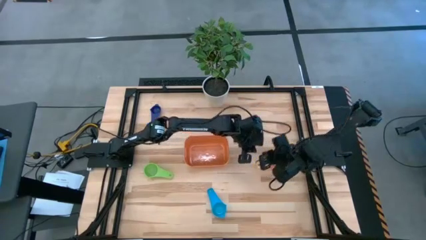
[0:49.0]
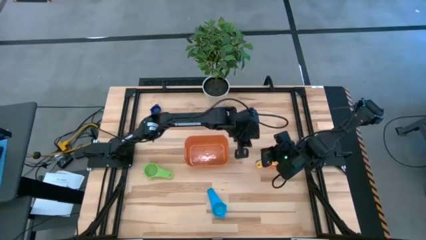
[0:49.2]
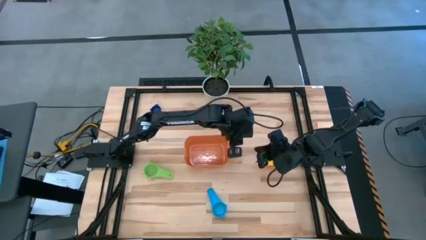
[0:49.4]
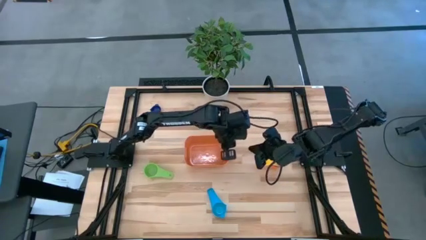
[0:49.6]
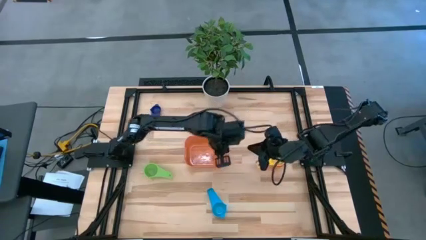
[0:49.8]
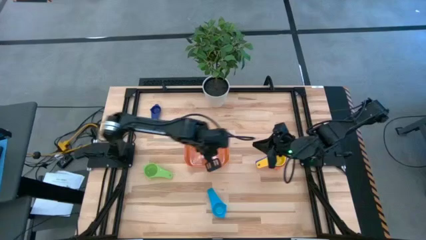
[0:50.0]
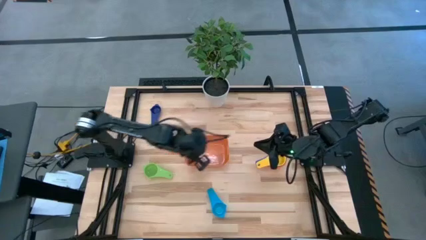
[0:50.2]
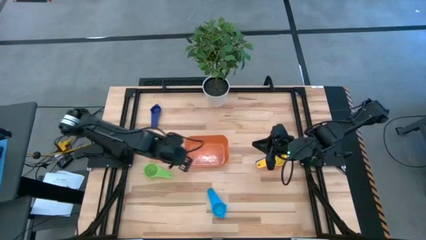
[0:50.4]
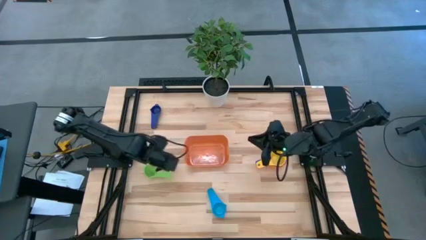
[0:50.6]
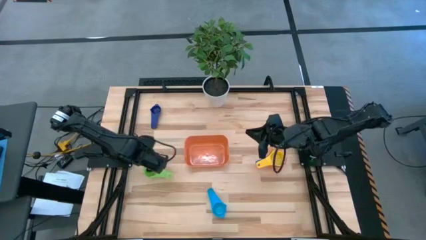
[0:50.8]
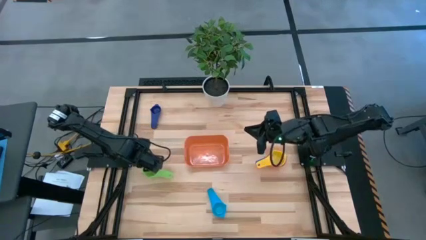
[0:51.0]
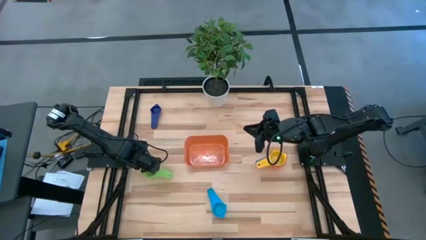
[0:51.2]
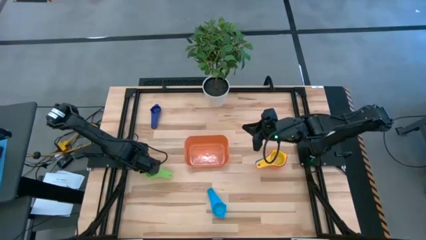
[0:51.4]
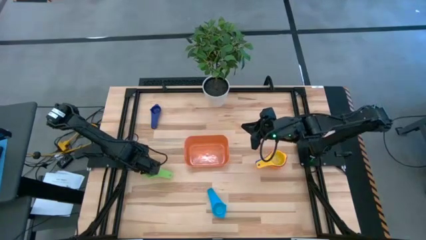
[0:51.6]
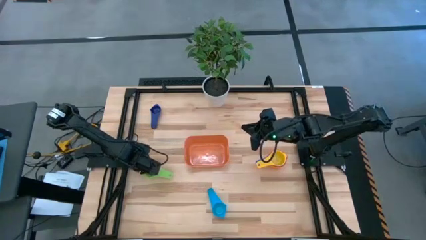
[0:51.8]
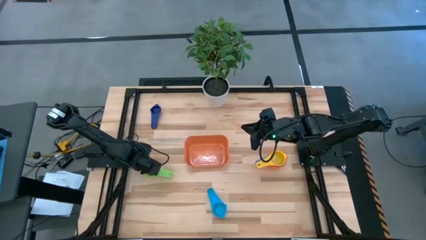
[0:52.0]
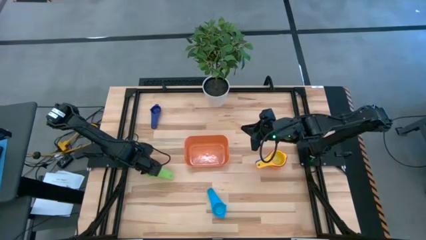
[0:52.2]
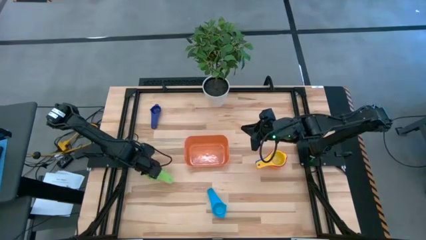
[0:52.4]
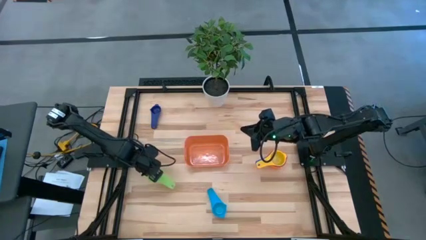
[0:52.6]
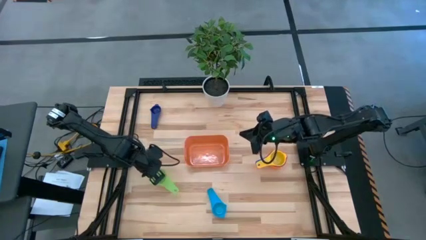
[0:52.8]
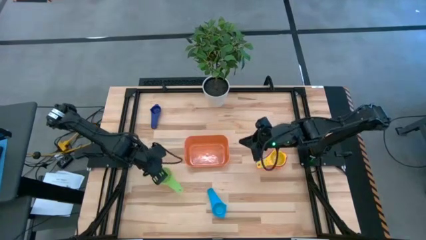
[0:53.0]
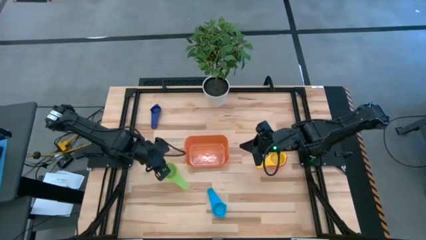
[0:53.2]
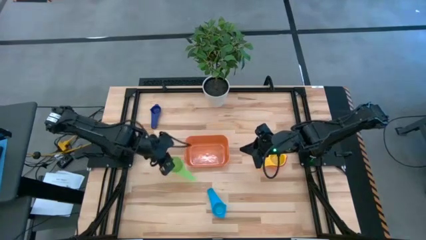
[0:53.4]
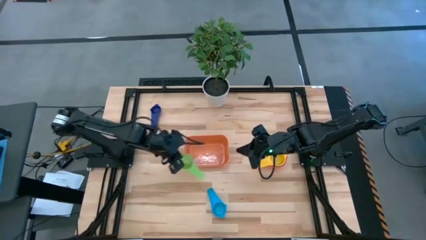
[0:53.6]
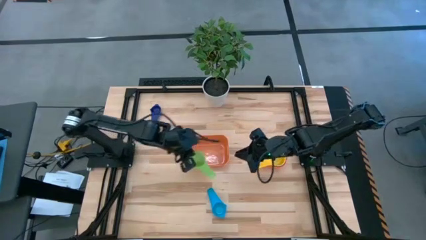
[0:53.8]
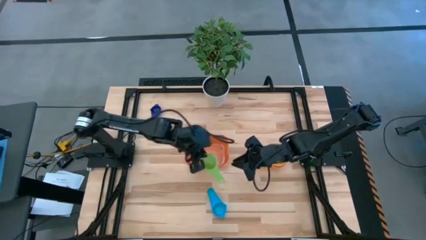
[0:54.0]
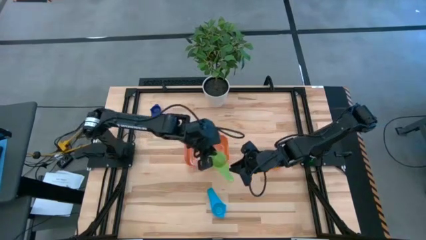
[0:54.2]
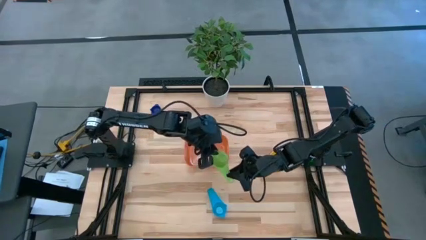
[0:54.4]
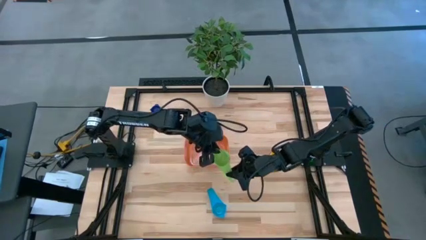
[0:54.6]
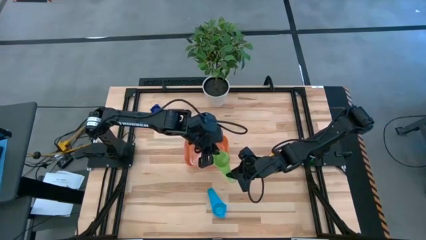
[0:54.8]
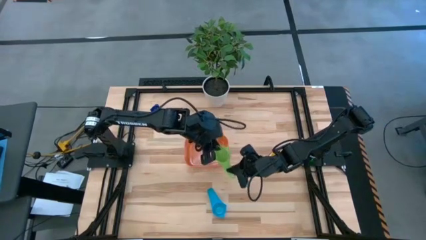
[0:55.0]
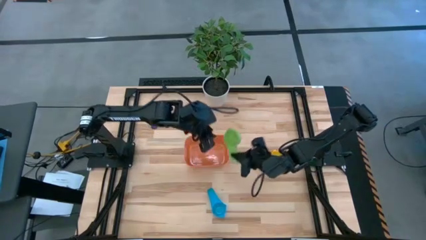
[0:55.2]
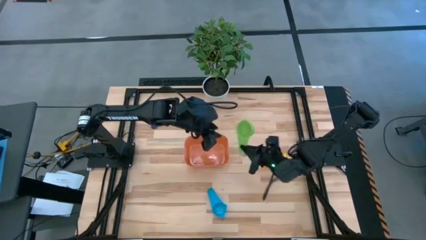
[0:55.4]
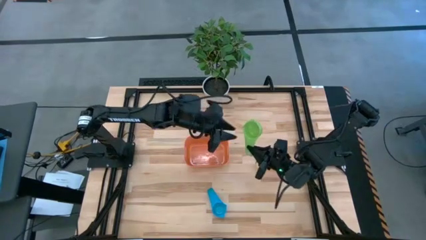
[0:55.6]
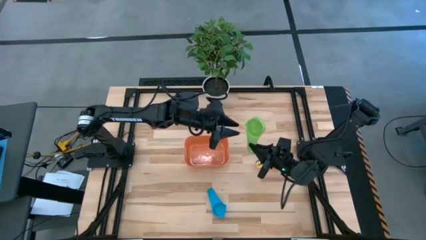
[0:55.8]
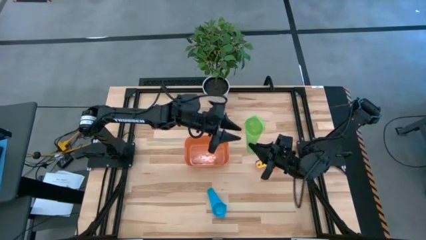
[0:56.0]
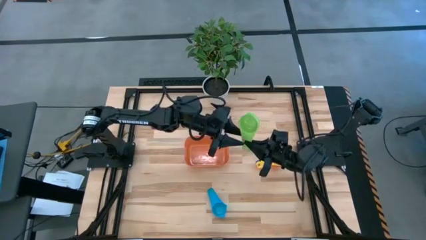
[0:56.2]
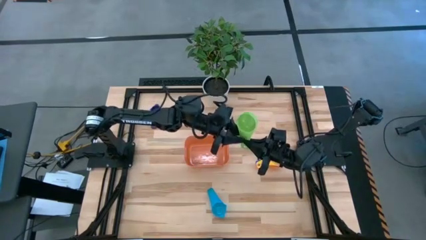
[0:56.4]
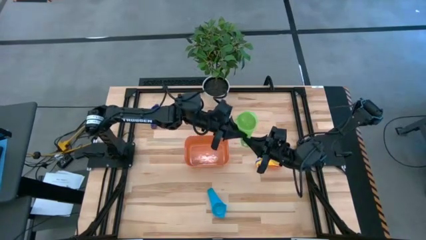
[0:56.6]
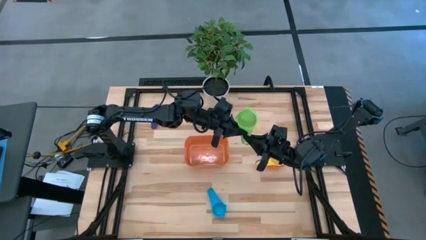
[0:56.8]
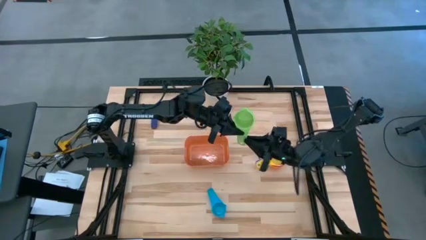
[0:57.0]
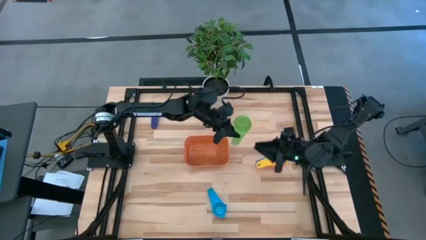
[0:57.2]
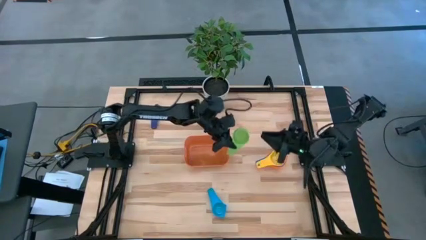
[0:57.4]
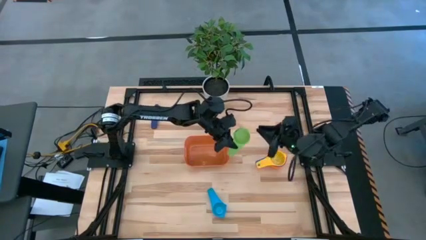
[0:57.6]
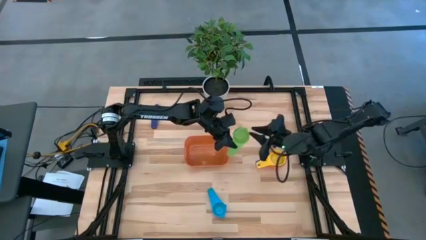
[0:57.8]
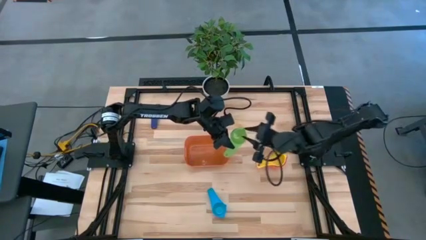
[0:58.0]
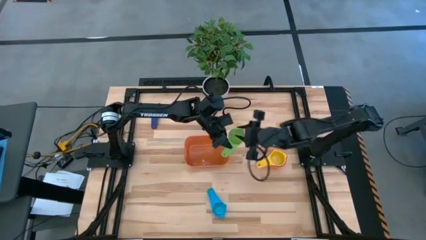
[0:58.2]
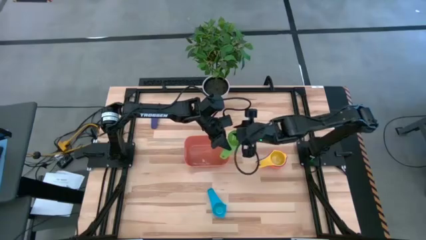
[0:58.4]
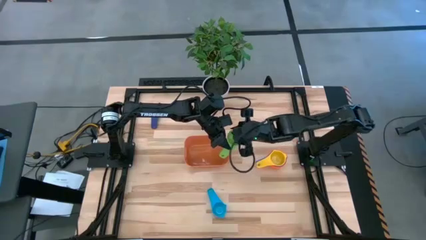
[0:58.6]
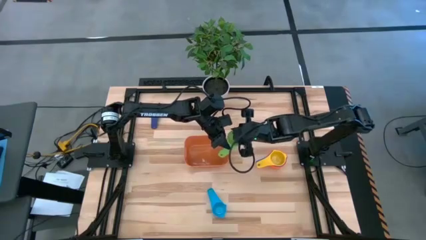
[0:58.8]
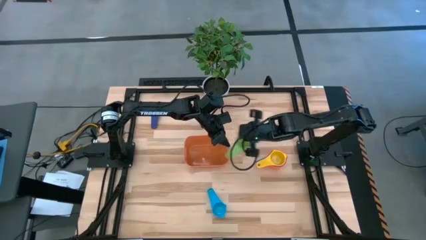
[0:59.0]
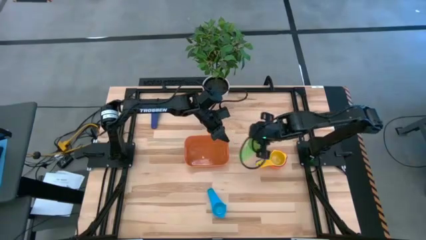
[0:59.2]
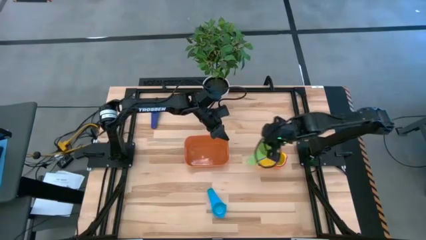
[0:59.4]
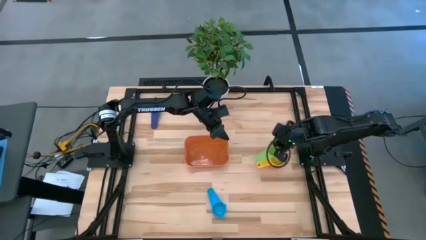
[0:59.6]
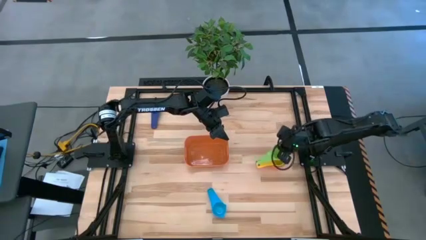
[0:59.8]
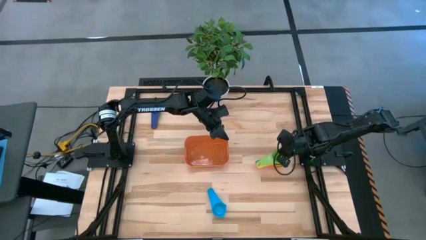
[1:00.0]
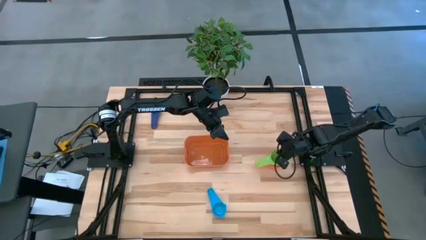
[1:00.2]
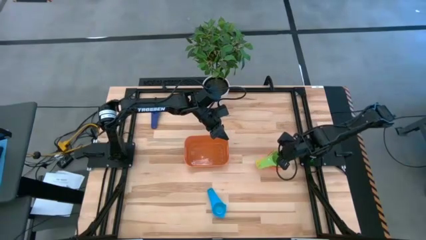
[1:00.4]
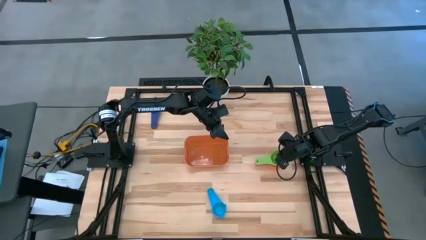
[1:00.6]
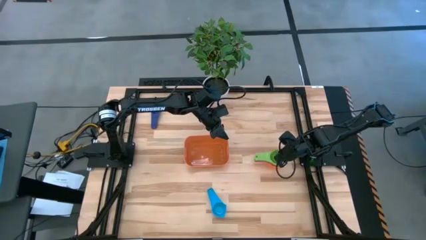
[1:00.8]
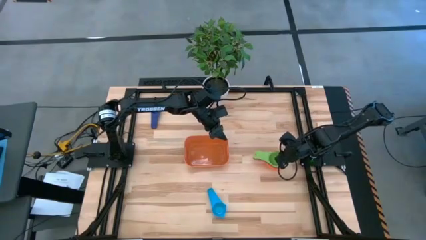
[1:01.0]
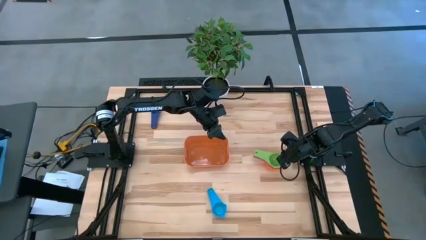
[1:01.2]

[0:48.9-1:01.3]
Task: Nest measuring cups in basket
Stack the green measuring cup on top of the yellow measuring cup
